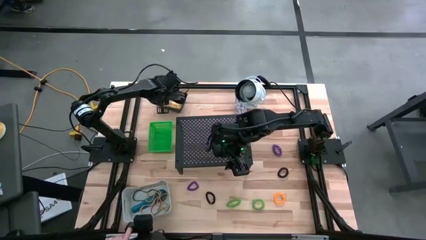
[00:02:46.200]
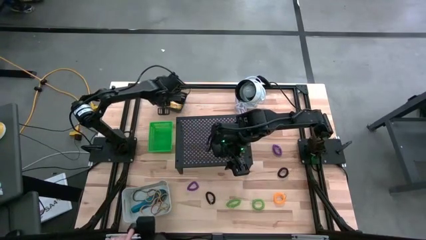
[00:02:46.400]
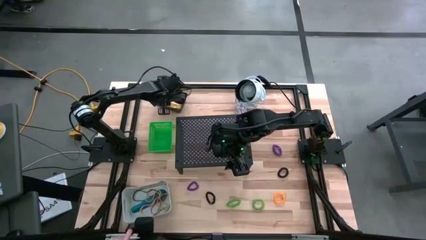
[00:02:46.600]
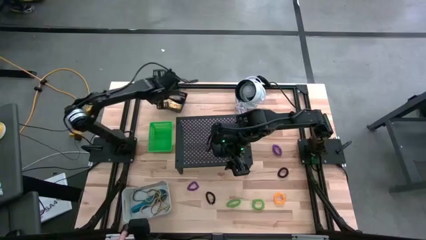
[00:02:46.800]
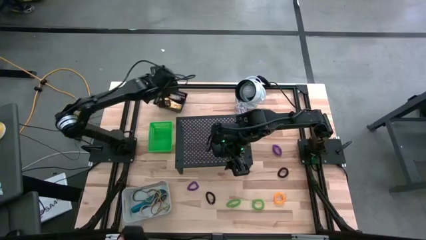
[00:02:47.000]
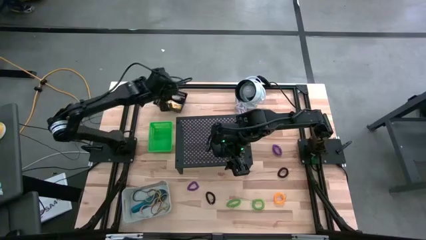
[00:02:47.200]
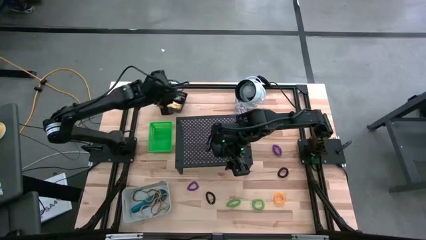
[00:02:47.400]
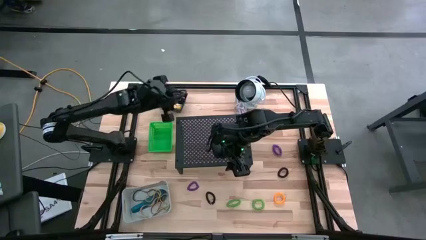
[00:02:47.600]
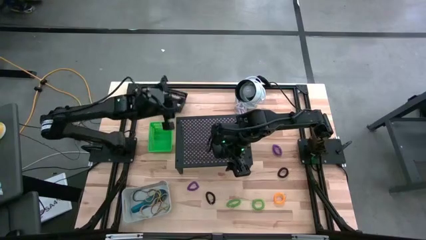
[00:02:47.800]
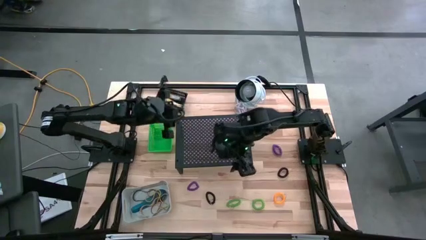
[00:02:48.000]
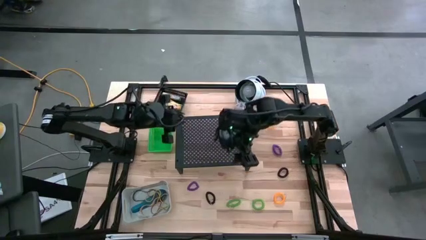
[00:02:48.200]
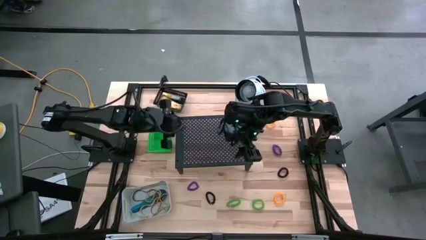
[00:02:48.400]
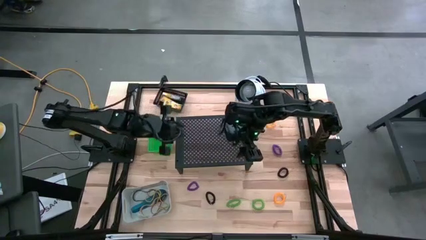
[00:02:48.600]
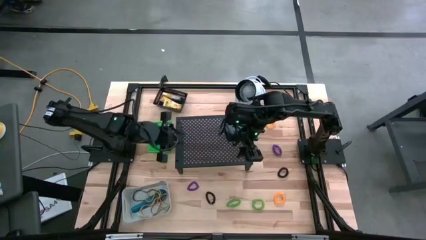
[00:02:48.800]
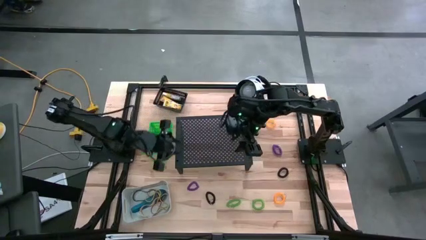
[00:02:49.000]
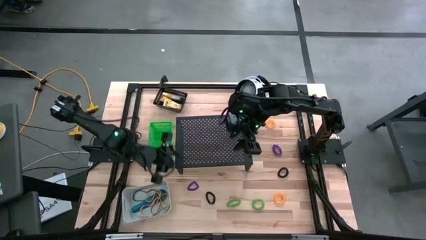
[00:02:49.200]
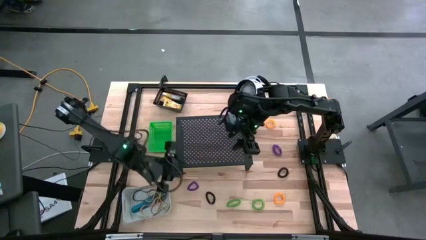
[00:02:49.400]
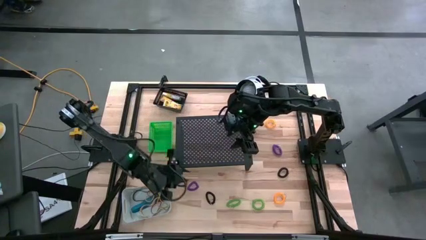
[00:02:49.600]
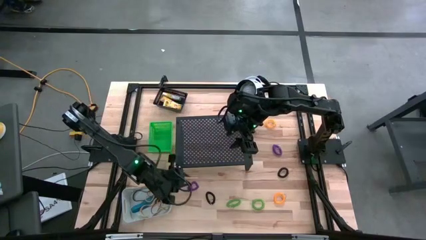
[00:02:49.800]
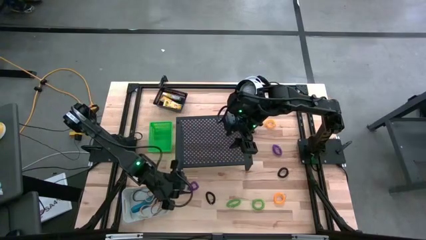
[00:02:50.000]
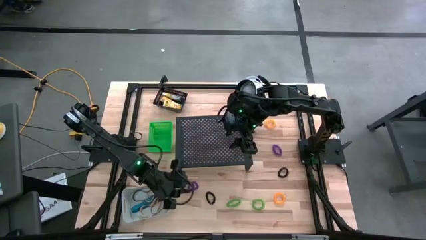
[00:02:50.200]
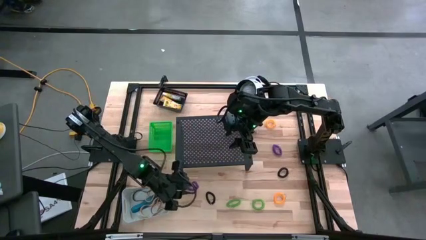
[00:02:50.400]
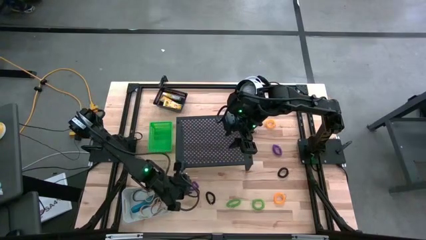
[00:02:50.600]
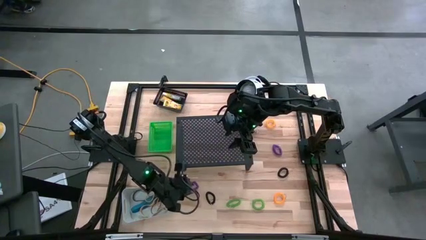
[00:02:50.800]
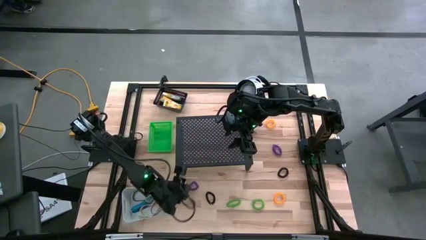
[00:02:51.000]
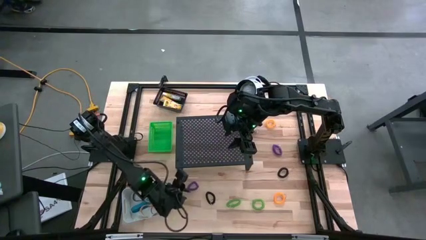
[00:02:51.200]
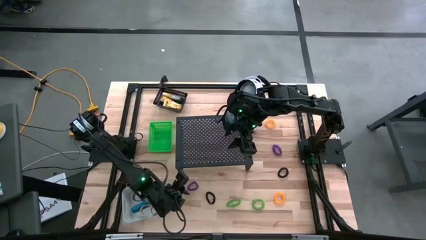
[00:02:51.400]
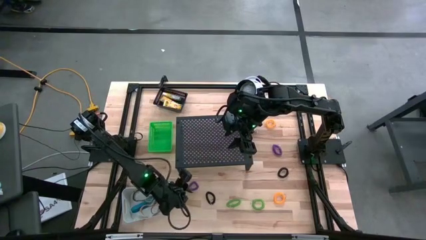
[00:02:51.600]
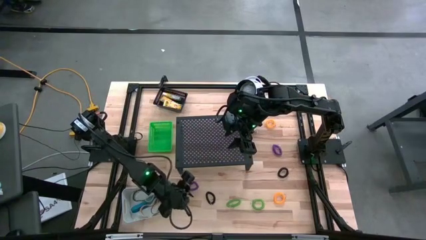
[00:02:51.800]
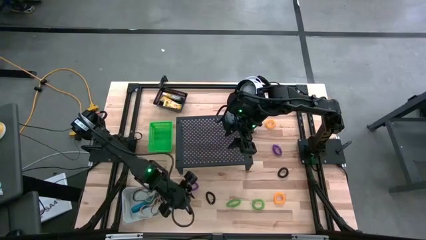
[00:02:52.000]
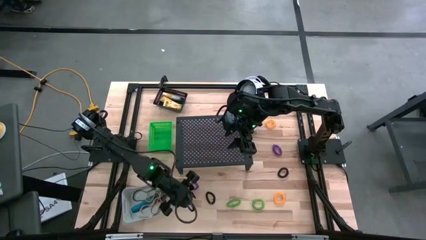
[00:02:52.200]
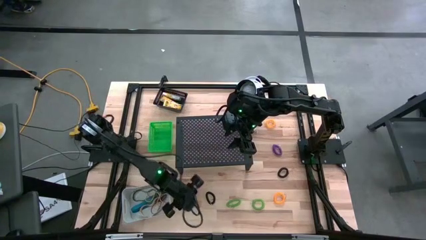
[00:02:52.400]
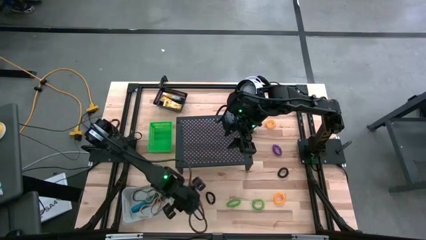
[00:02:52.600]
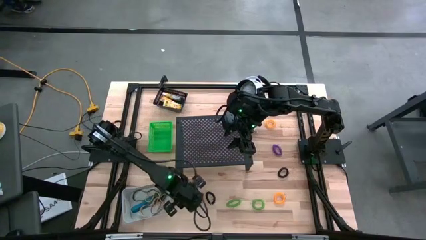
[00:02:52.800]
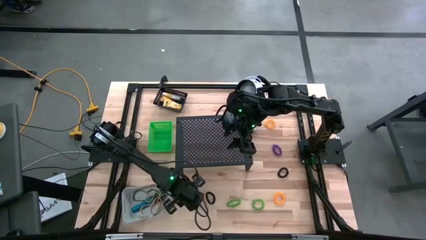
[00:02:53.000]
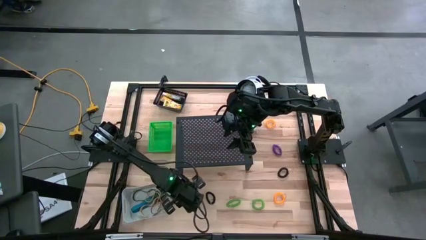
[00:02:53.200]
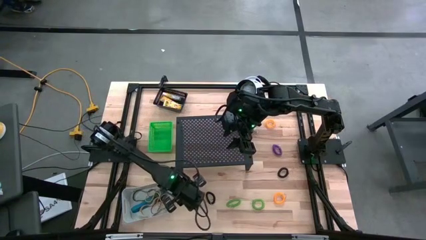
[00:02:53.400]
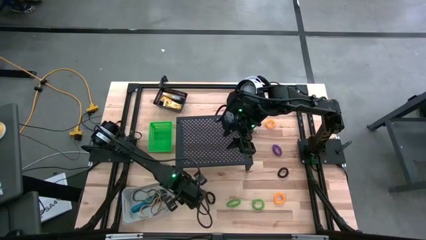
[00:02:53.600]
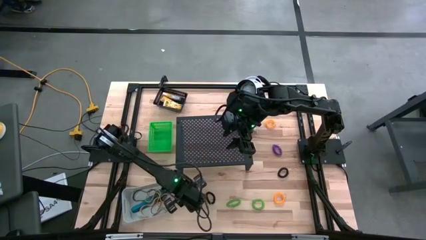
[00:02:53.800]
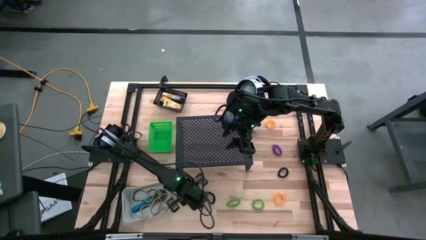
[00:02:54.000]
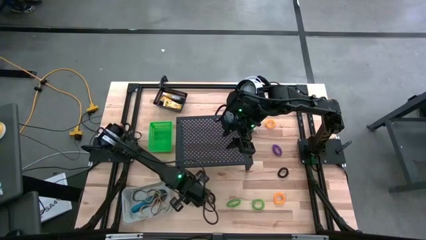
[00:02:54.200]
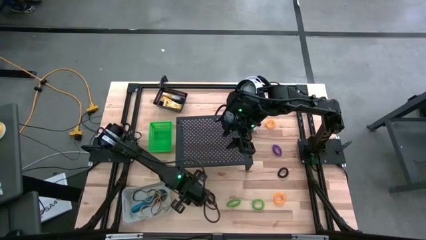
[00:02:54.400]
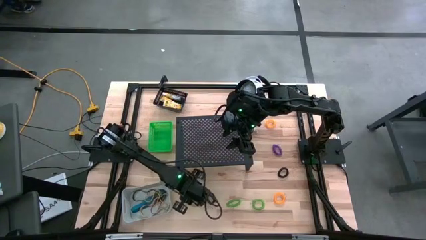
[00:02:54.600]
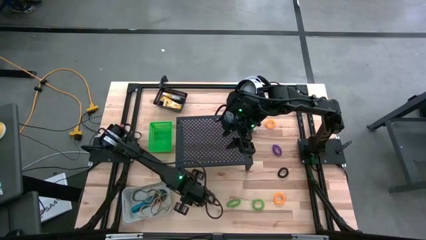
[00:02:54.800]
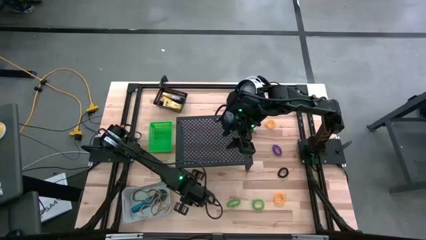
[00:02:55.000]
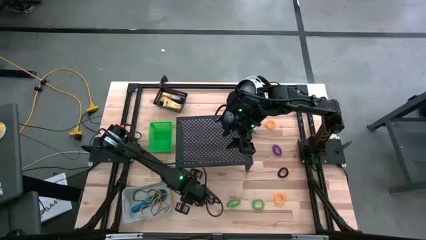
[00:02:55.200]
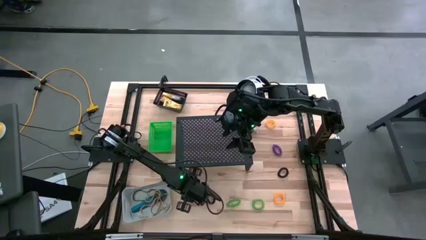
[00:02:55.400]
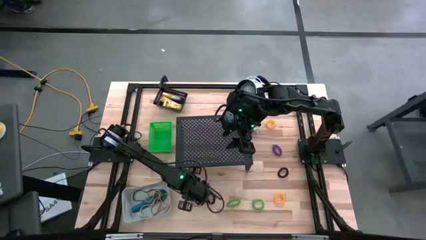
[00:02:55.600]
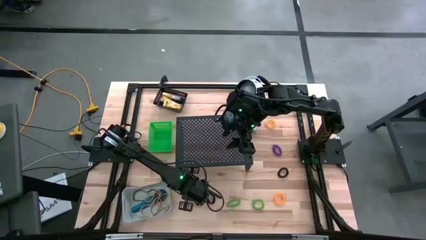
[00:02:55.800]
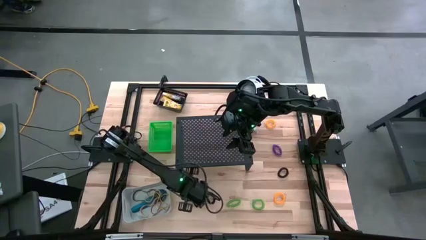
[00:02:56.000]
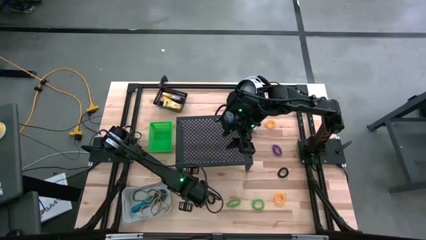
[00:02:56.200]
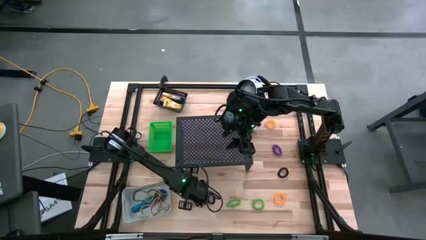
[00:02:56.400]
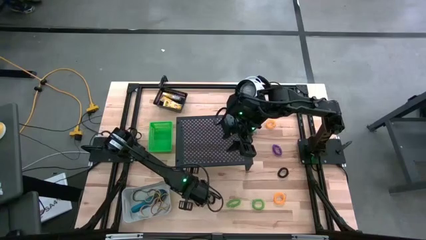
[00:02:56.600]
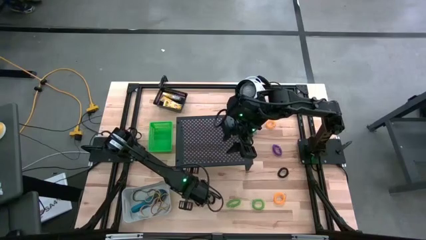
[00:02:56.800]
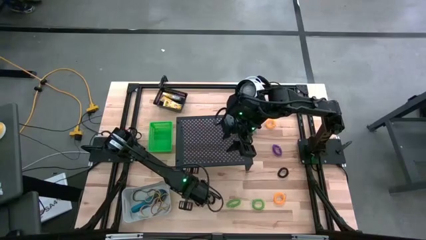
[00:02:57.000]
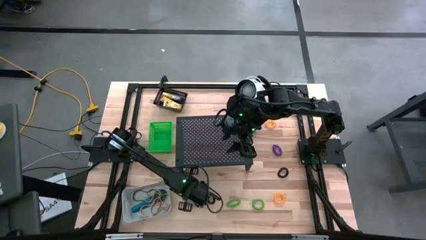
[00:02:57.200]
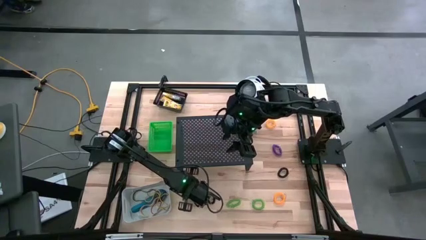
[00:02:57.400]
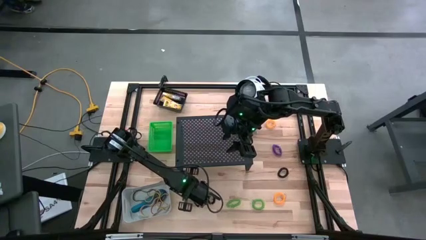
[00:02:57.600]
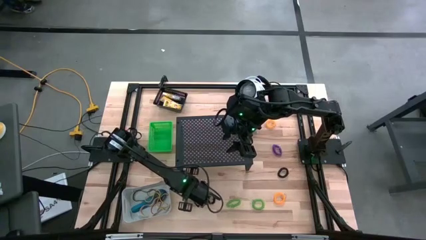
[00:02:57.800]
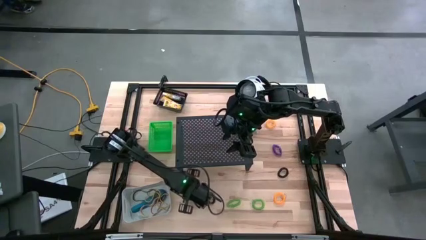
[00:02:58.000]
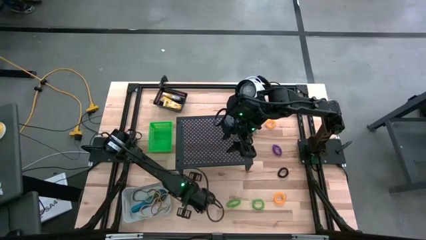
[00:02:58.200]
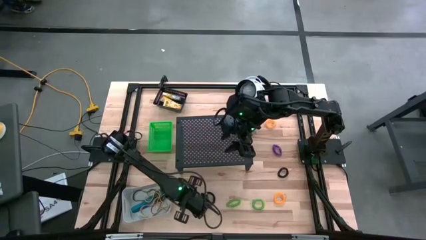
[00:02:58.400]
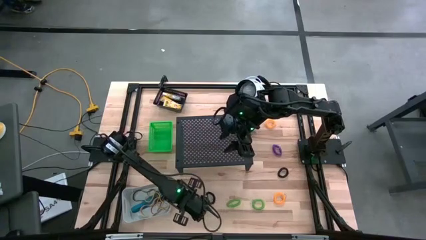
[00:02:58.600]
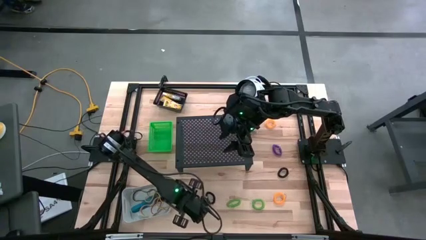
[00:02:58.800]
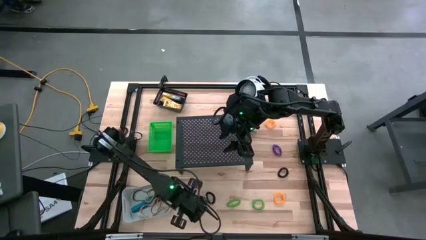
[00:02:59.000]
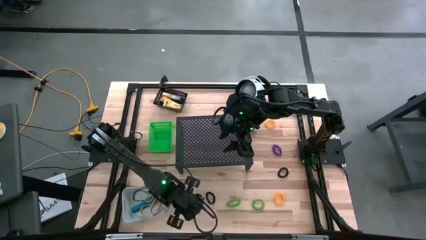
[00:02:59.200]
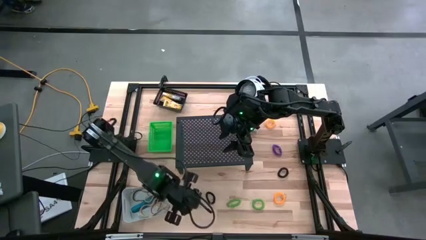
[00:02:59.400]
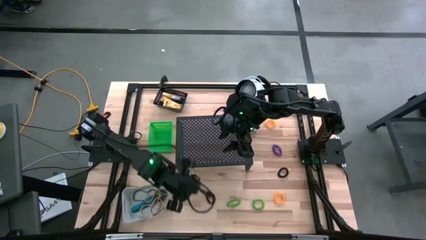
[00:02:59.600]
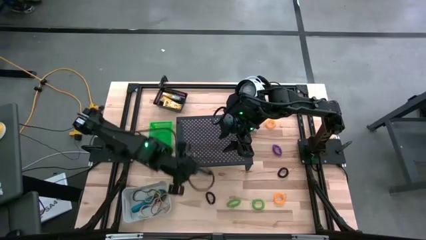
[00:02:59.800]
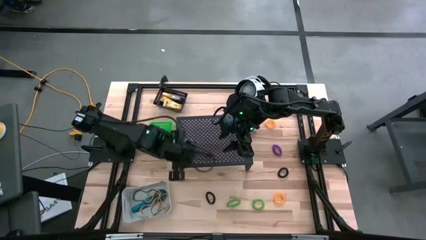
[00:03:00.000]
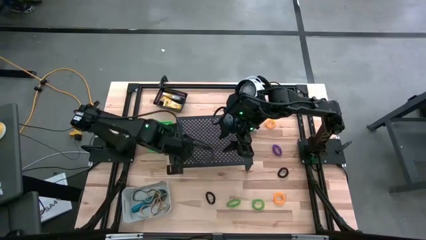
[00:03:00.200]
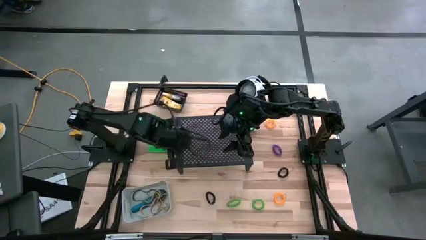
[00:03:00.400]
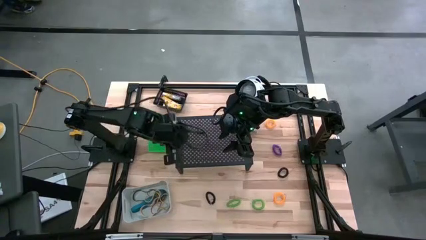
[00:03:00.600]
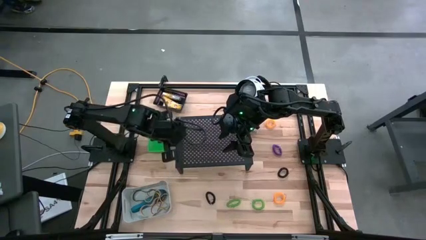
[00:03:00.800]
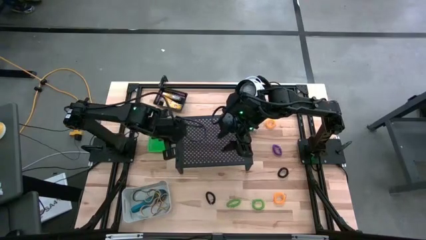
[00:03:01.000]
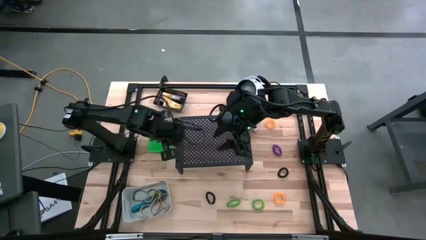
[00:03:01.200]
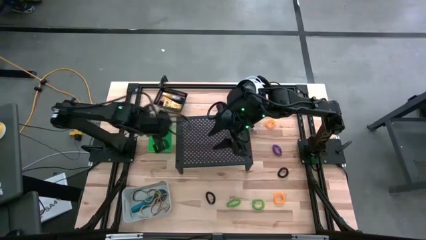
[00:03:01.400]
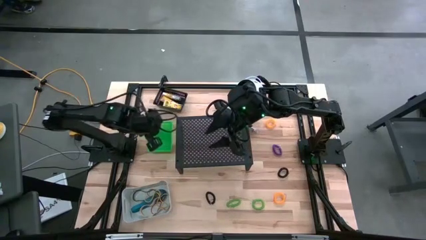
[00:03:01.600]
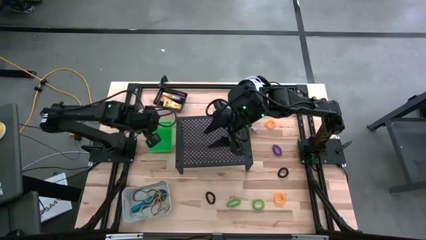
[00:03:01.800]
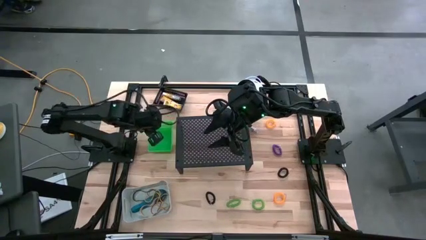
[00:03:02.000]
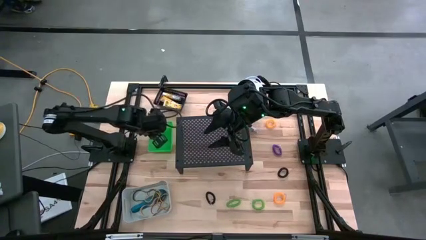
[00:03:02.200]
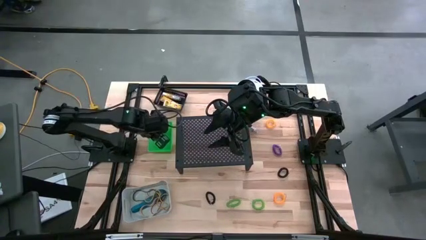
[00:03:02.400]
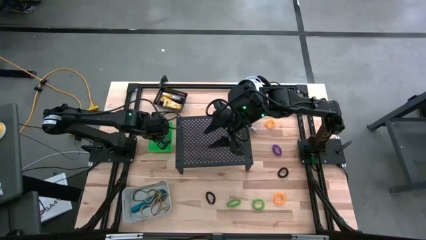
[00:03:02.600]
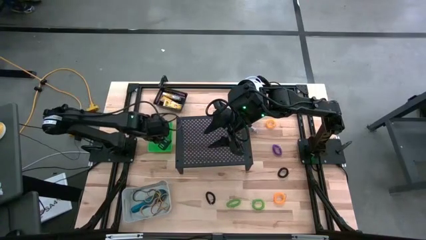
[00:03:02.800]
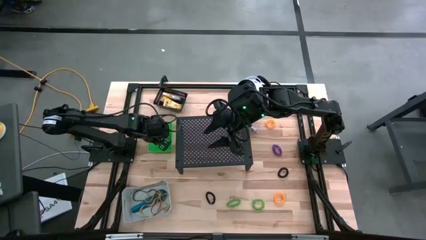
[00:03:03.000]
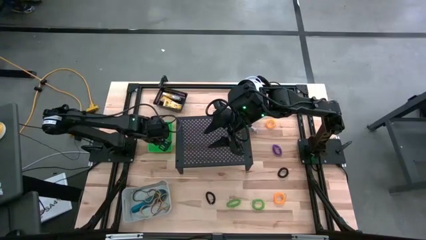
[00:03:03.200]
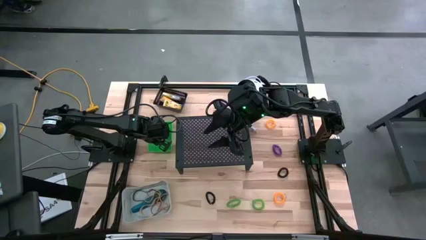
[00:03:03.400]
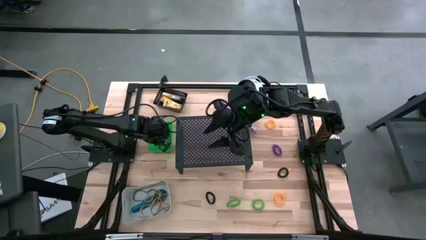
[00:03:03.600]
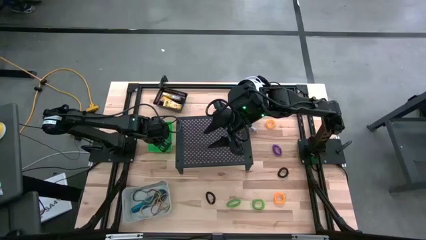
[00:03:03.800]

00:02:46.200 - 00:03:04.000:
Task: Pick & Place Office Desk Supplies
Put the left purple spring keychain into the green bin
